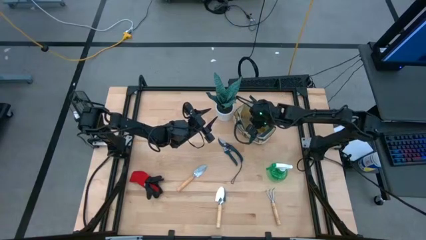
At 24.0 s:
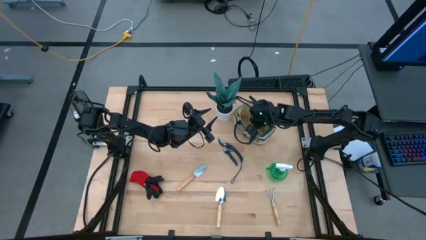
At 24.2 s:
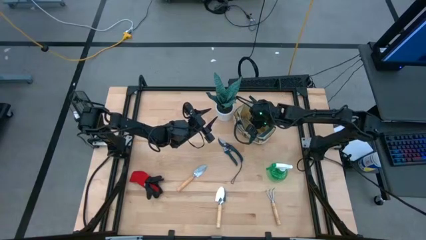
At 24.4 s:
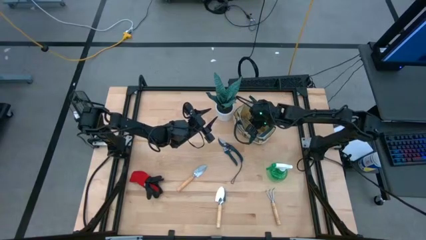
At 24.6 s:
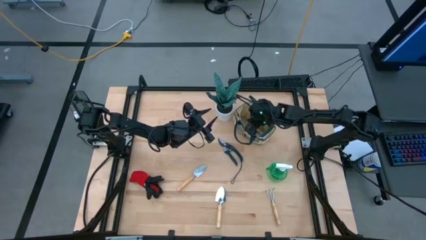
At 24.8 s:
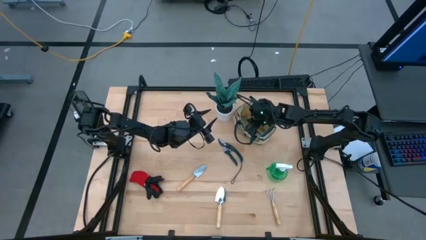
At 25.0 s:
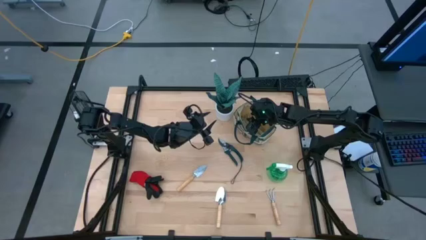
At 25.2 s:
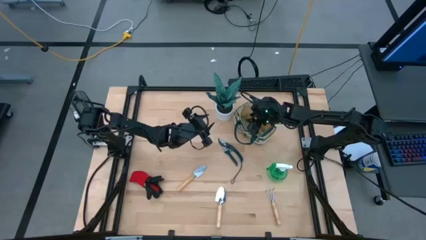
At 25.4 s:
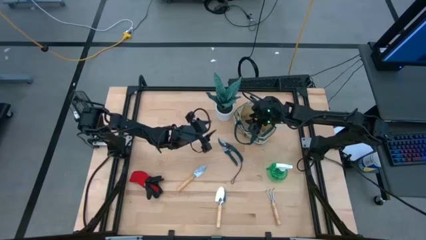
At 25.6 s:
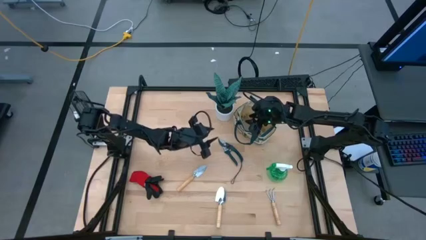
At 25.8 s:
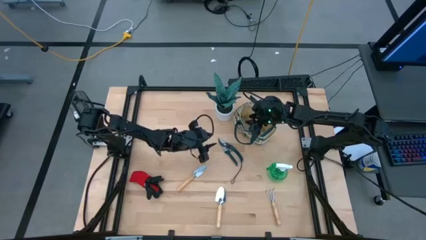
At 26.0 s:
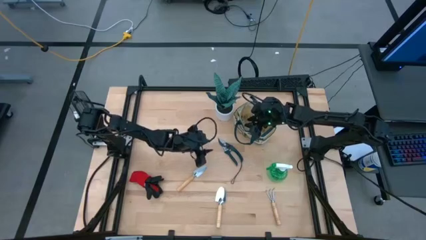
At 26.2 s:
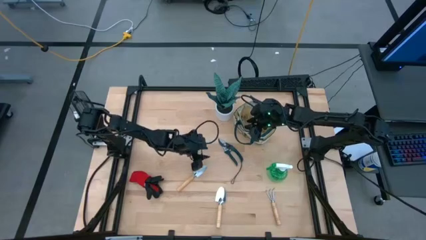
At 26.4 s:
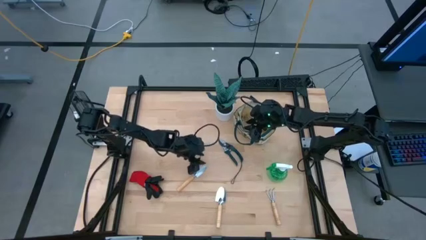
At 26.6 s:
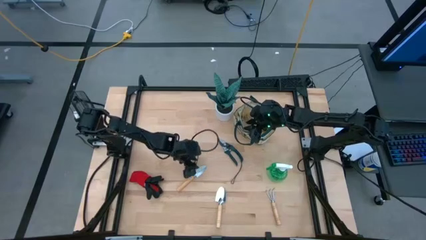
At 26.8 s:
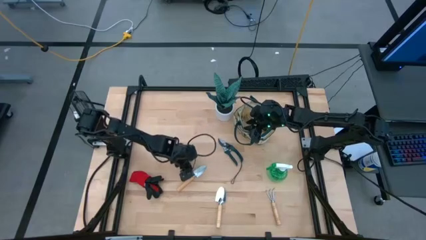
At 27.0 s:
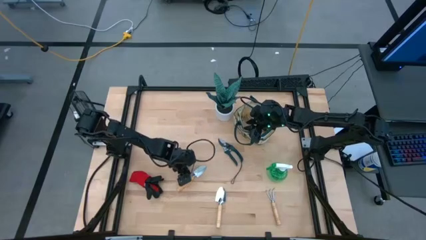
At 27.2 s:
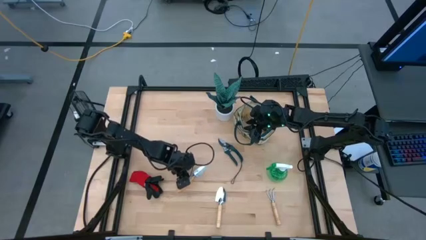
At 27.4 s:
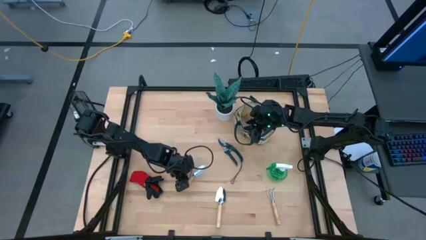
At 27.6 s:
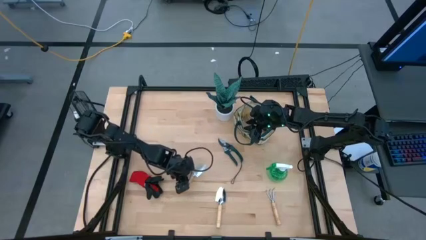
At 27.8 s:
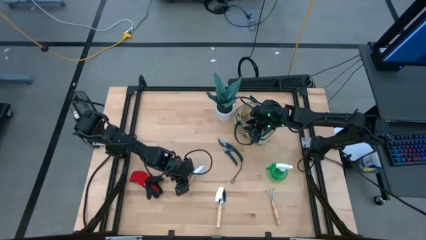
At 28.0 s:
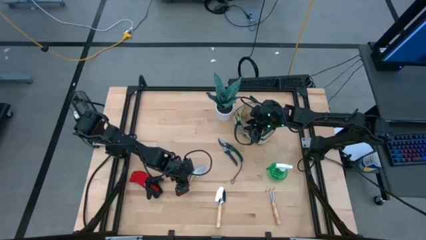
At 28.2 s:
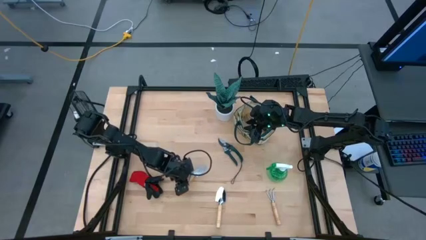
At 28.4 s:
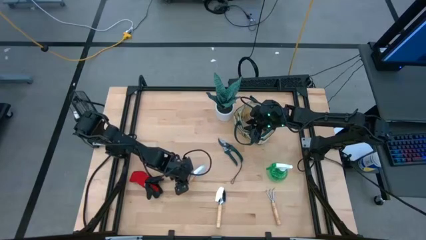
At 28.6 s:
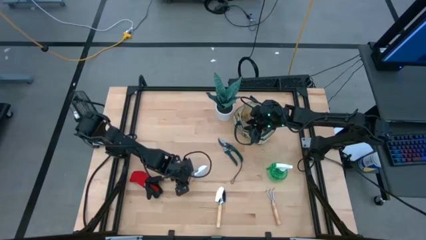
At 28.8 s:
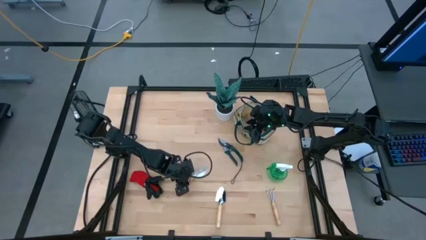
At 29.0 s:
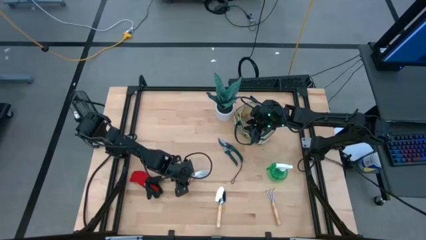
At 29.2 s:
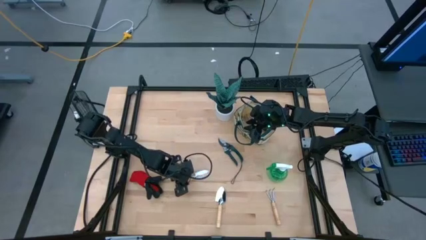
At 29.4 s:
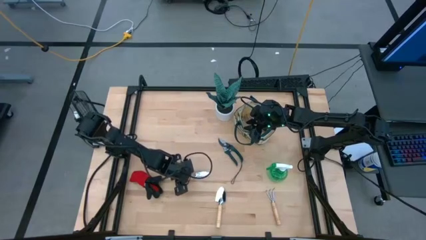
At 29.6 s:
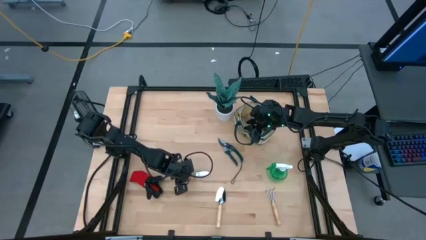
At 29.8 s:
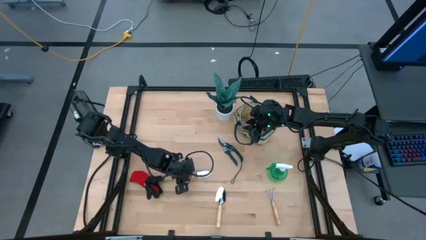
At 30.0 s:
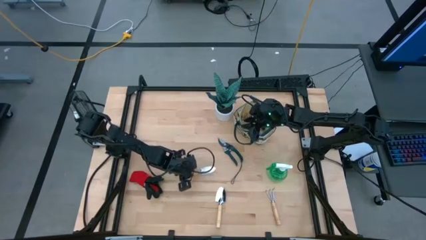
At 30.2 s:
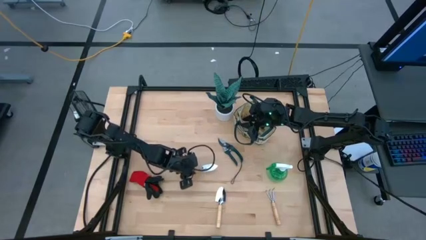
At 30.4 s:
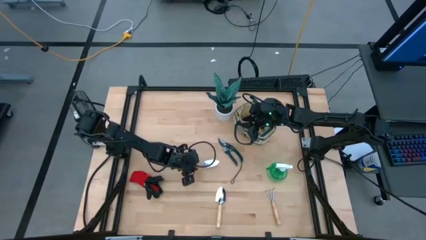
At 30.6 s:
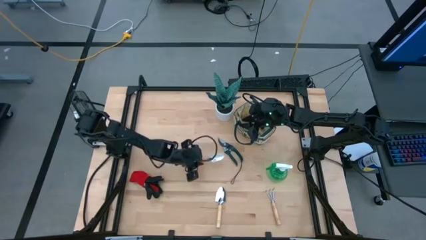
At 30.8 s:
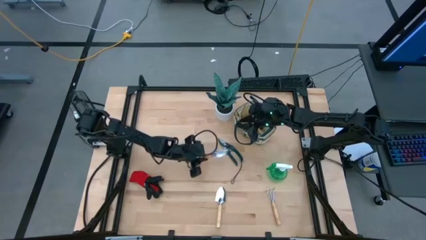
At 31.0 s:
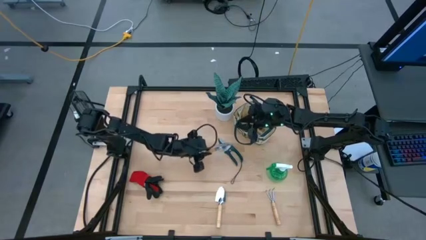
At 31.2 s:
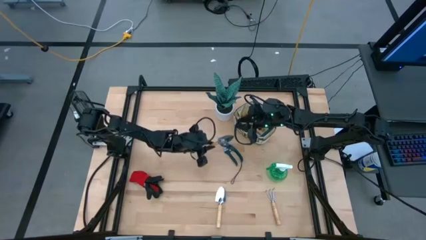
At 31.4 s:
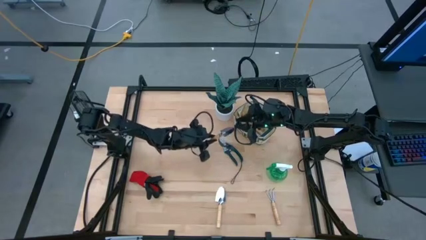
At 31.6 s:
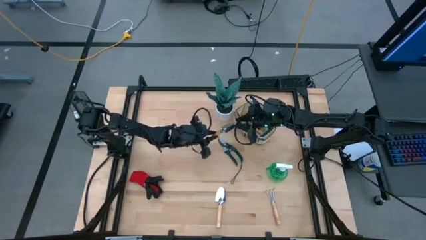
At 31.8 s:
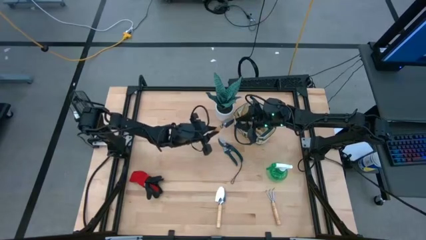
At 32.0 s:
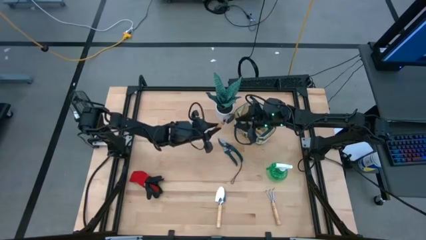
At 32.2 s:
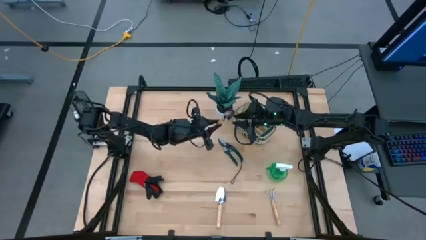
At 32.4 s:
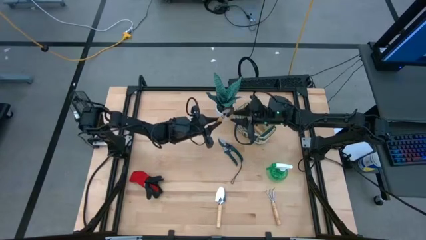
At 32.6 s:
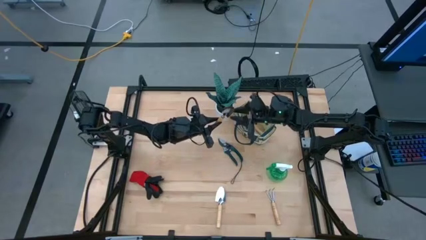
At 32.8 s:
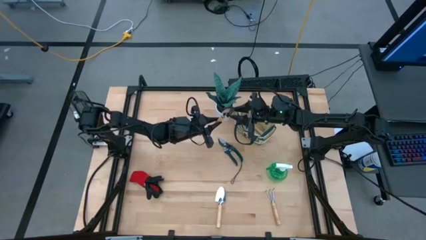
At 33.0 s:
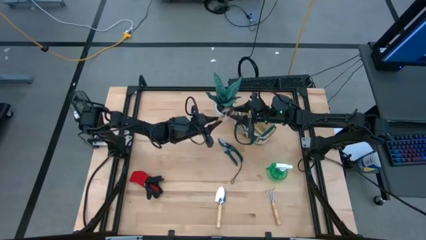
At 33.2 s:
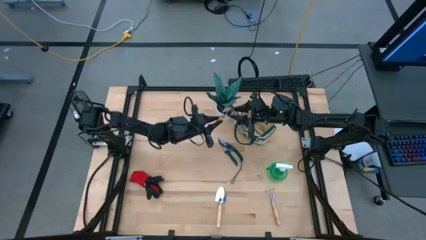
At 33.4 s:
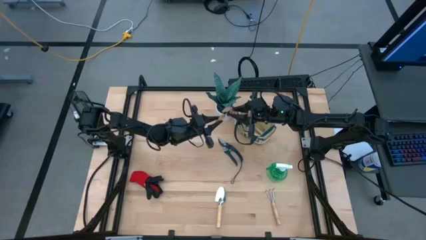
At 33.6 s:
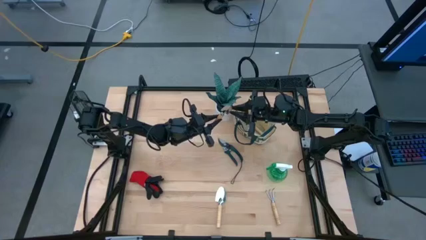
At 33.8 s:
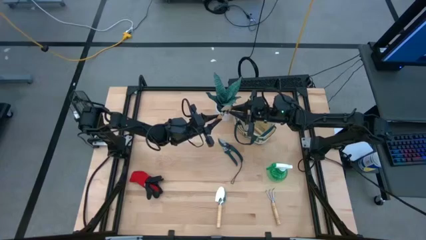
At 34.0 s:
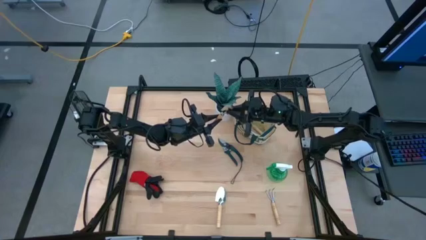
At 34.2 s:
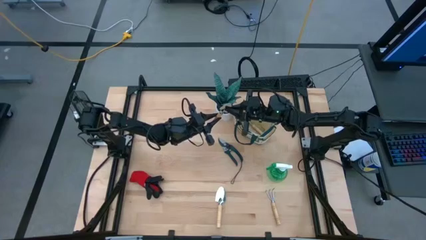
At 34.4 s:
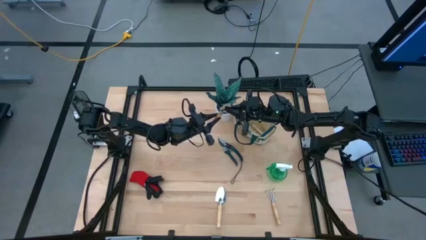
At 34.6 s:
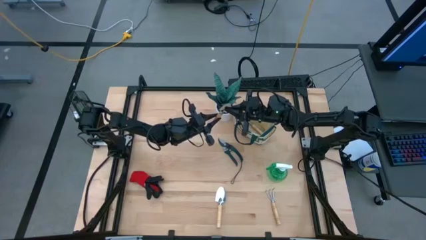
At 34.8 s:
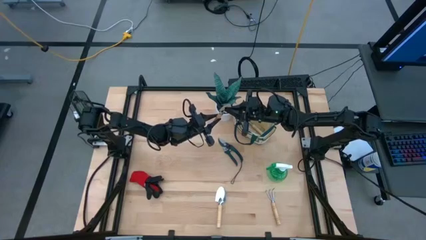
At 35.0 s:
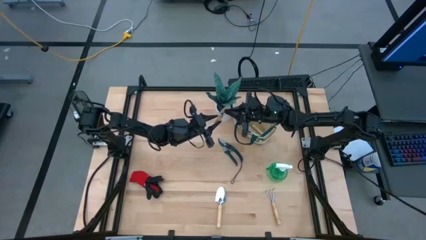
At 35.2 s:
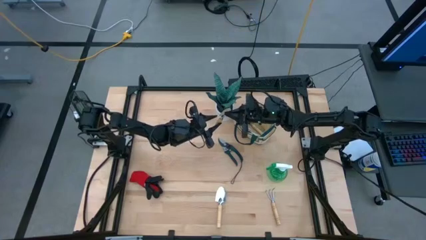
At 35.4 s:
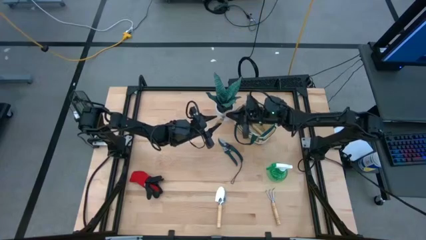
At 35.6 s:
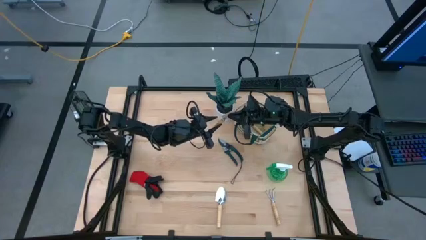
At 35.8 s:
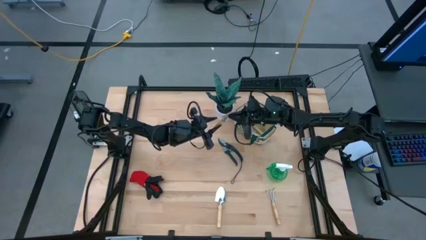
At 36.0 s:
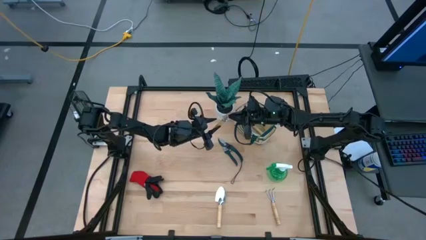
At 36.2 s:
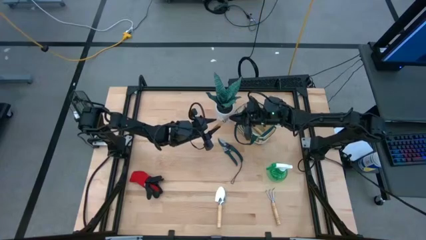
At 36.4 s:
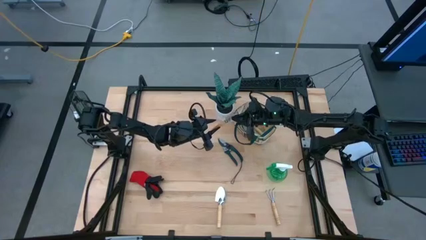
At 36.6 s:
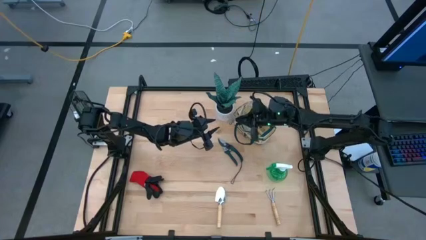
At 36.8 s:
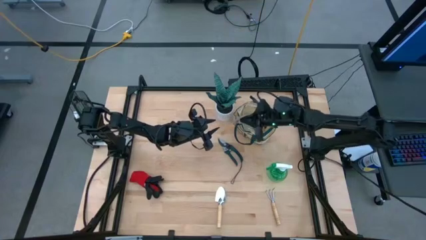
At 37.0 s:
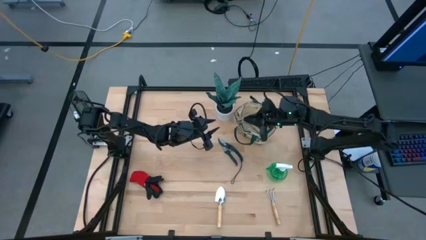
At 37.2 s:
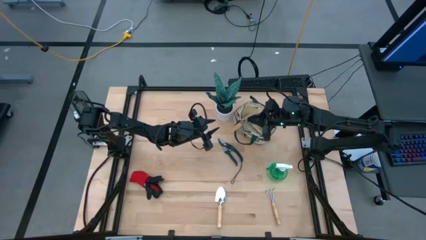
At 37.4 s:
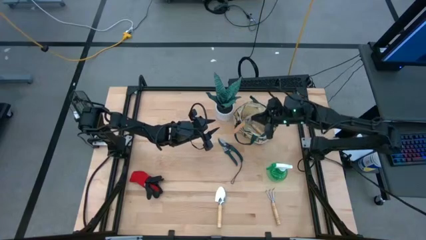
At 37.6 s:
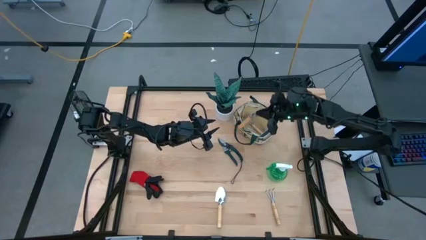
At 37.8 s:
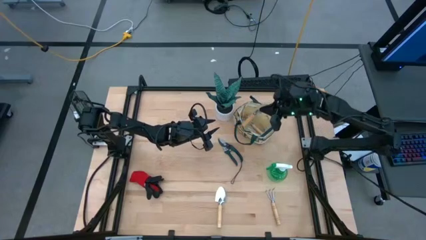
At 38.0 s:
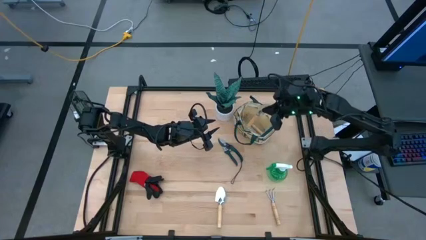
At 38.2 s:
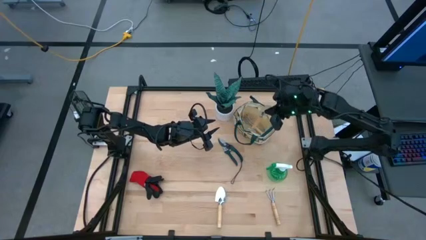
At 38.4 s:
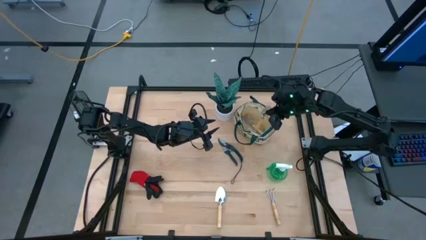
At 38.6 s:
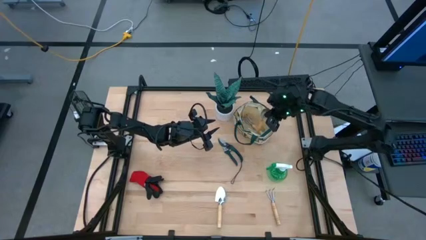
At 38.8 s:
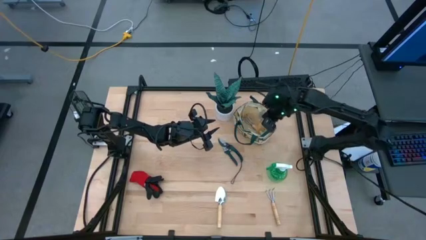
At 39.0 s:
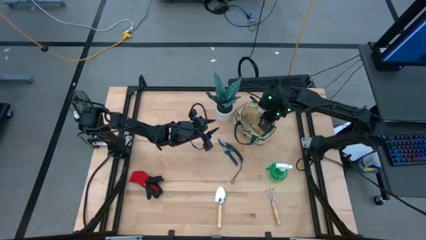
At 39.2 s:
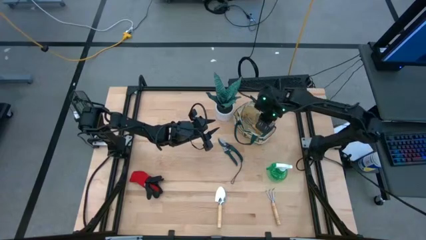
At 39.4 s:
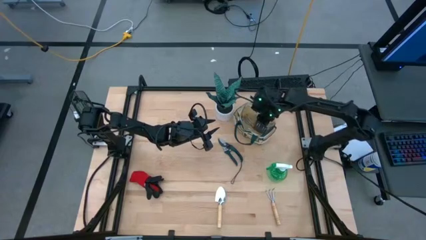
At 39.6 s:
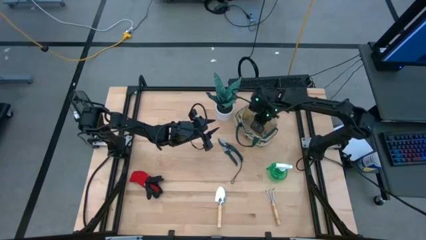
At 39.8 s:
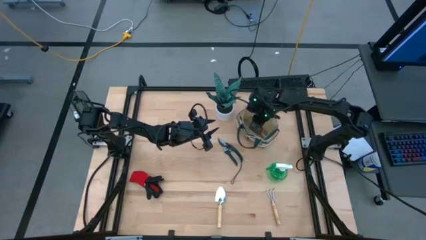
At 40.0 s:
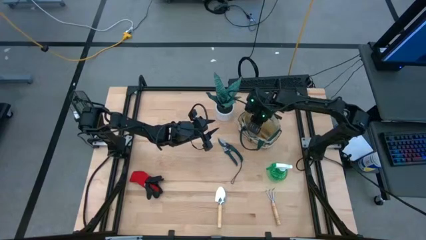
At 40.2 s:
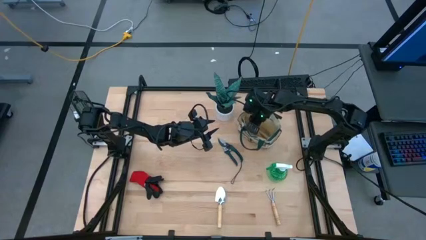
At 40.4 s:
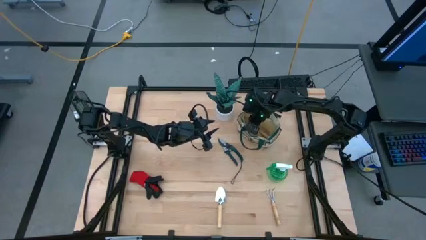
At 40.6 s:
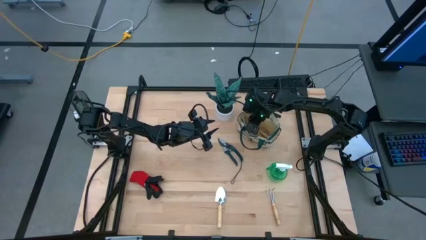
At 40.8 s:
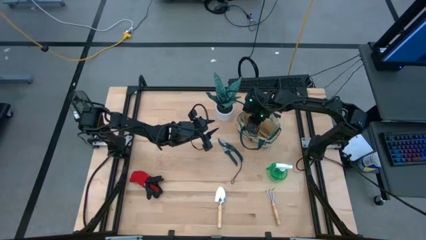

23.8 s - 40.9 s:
Task: Pick & Place Garden tools in Gardening bag
Put the top brown trowel into the gardening bag
